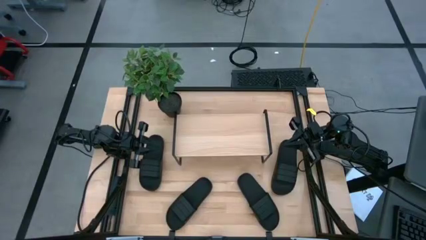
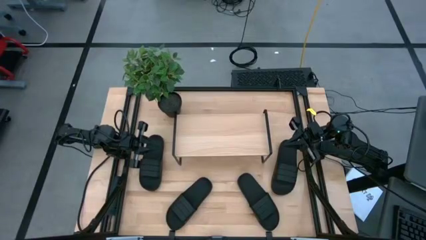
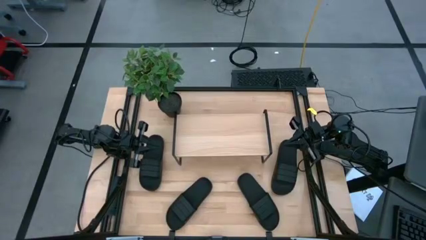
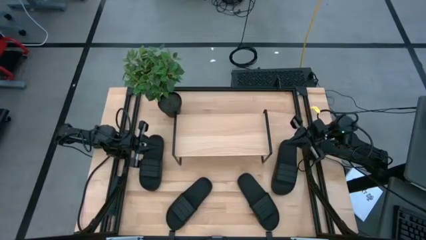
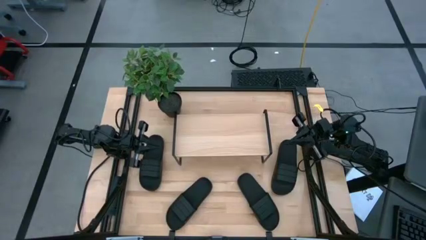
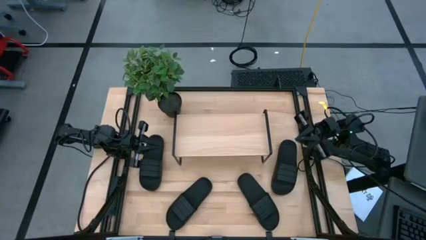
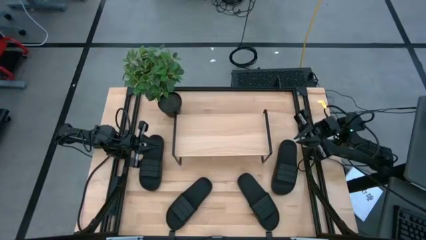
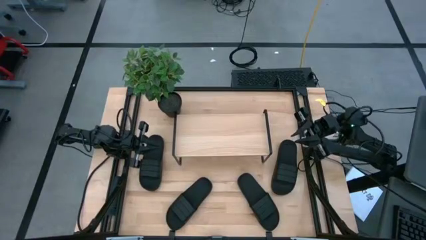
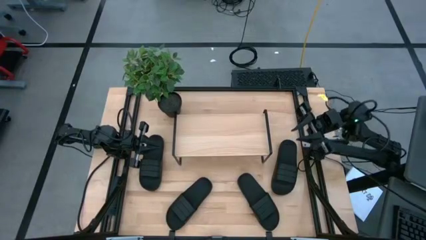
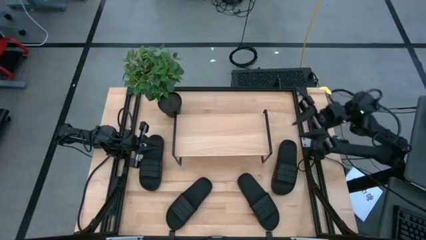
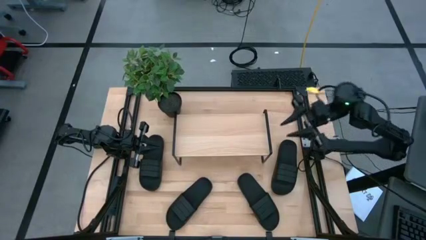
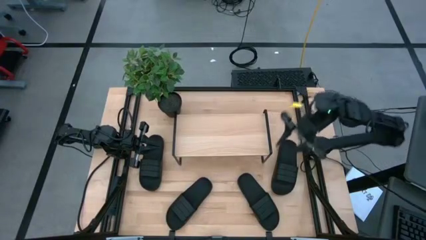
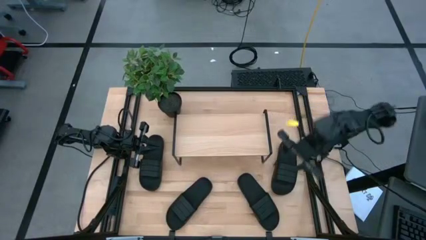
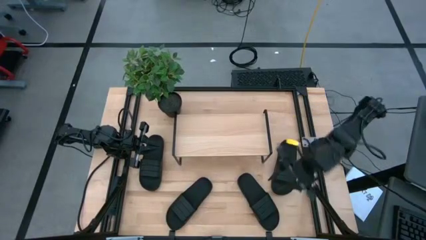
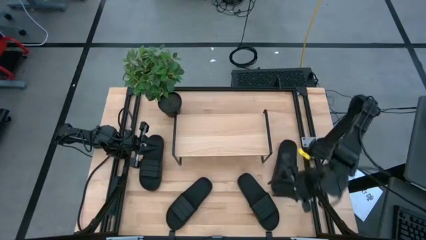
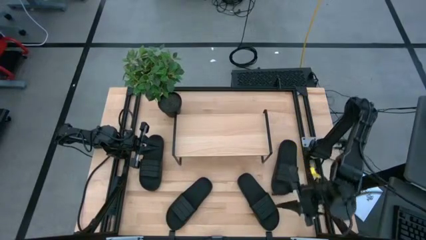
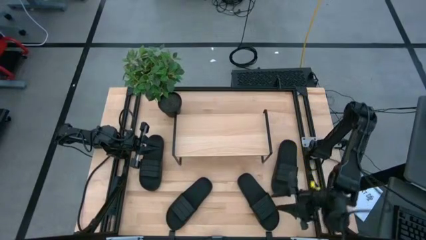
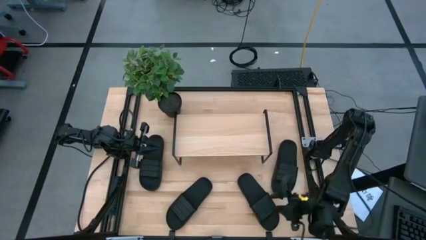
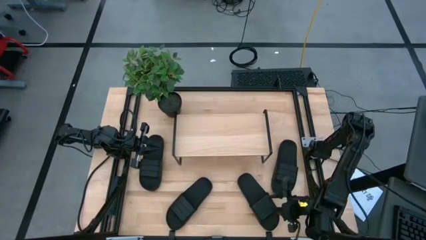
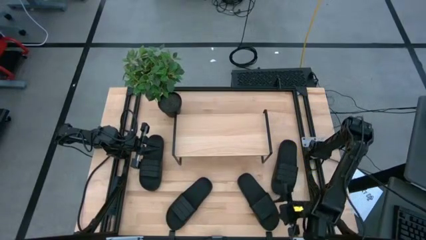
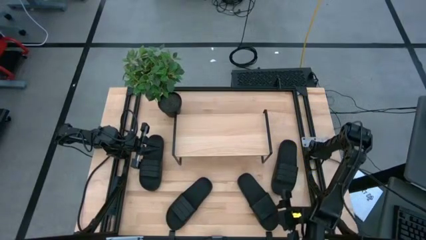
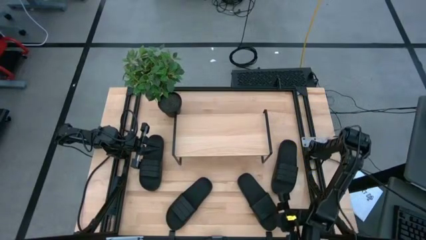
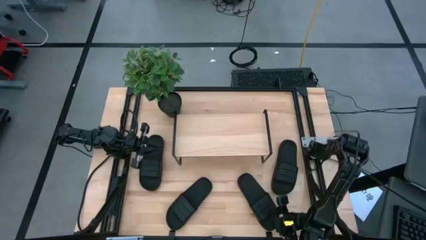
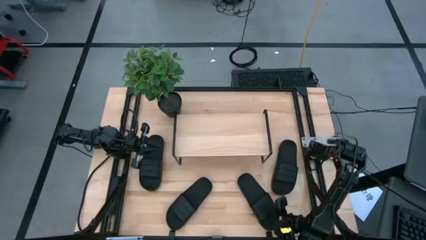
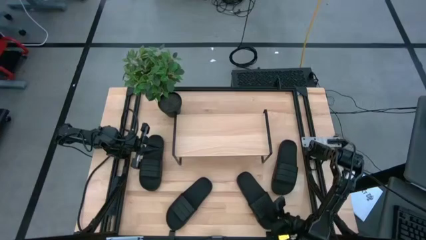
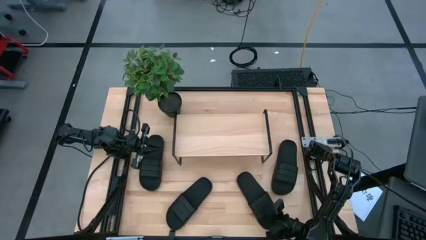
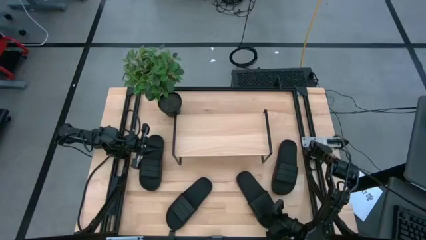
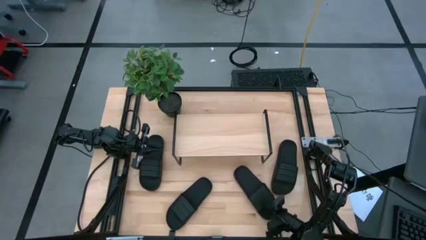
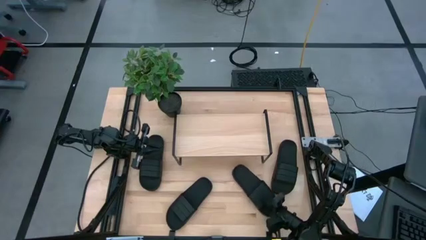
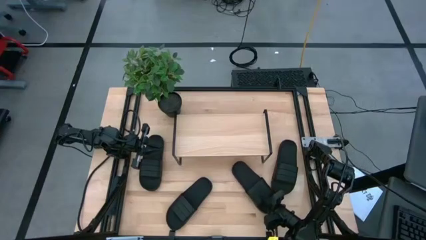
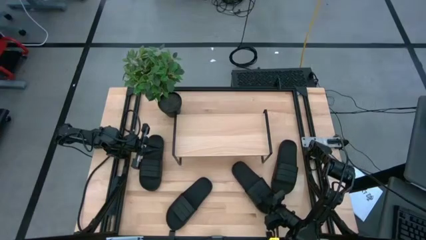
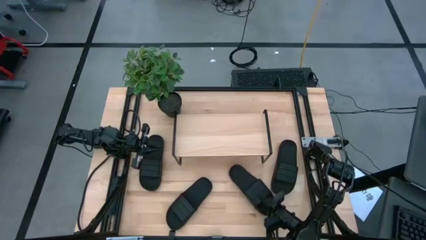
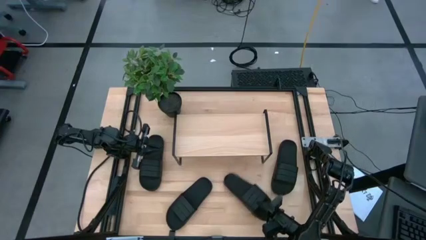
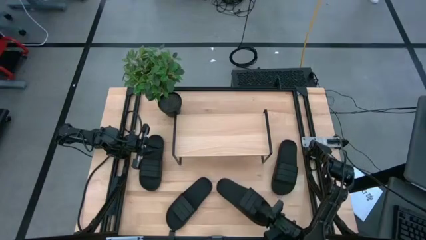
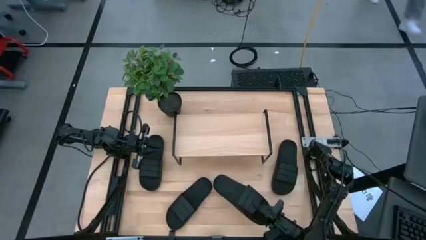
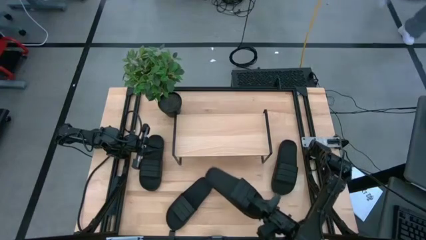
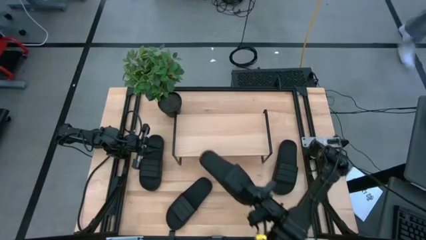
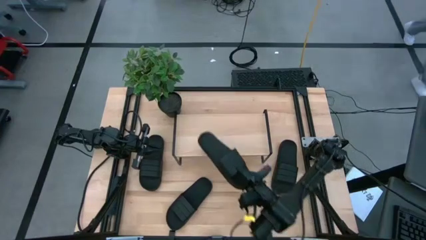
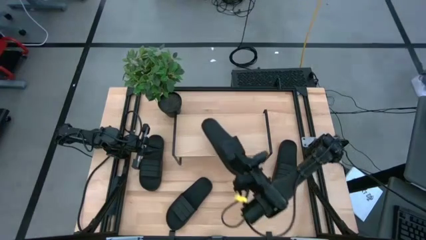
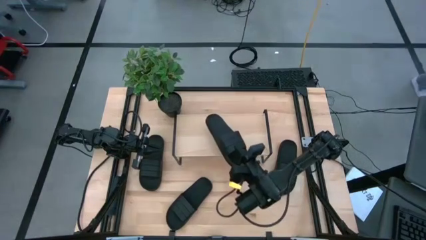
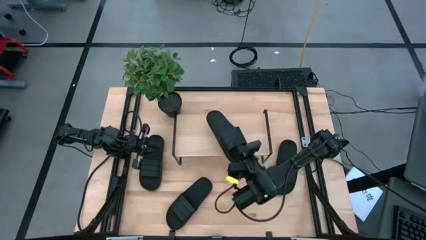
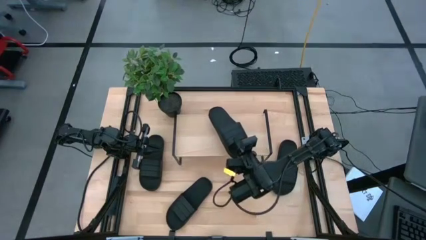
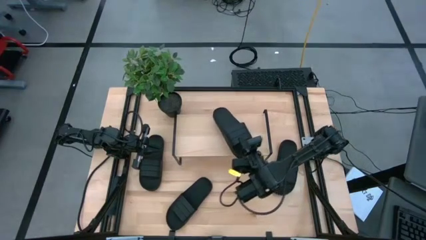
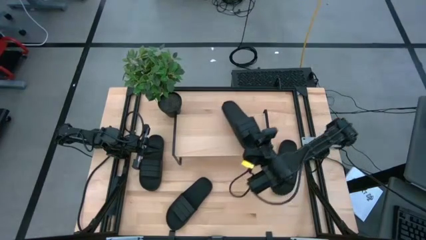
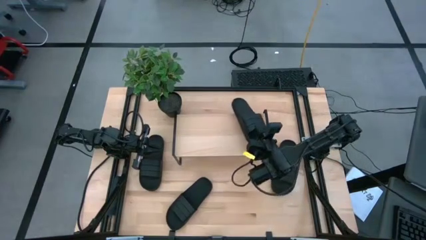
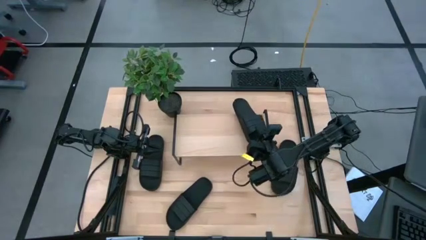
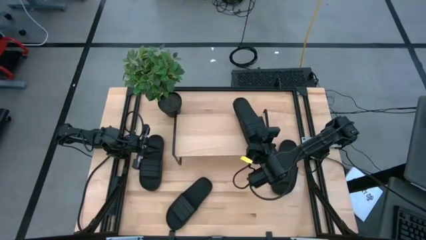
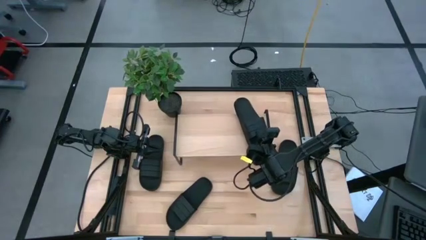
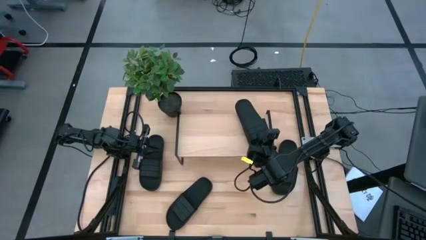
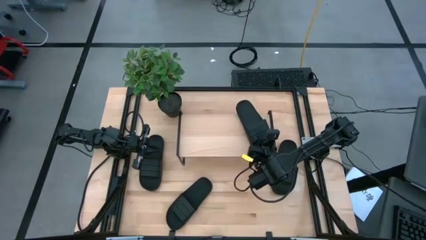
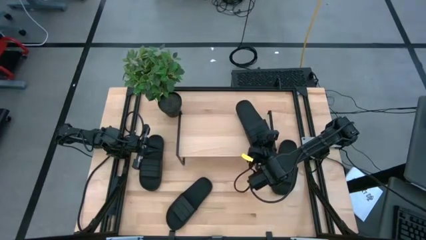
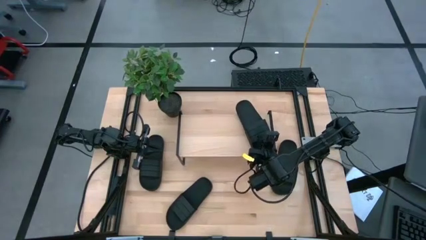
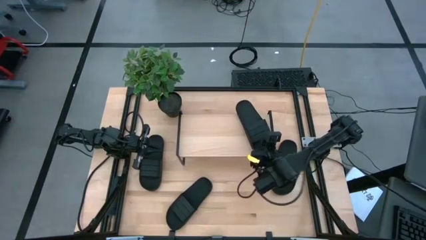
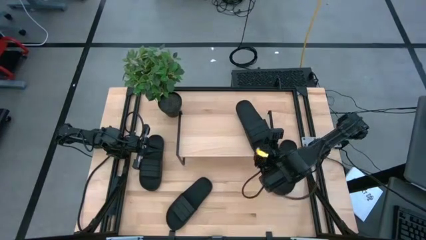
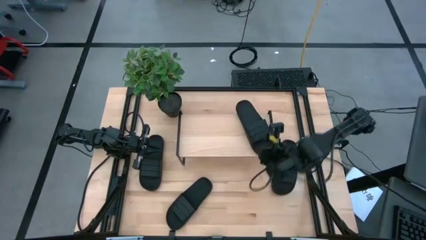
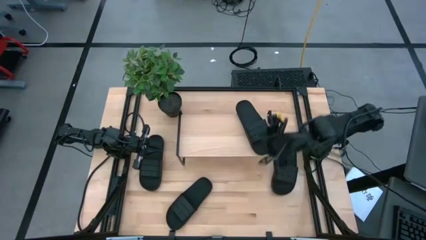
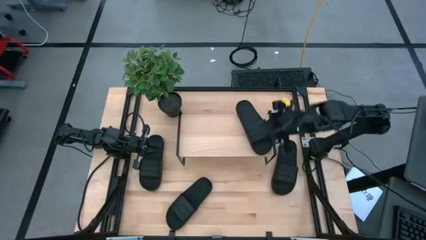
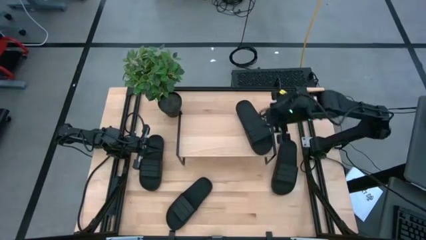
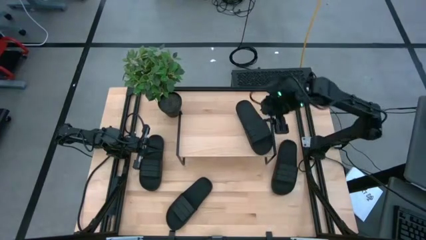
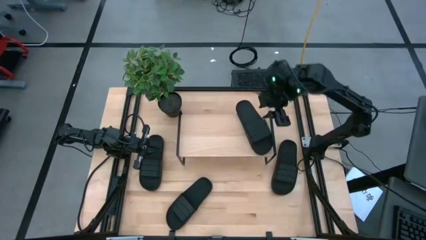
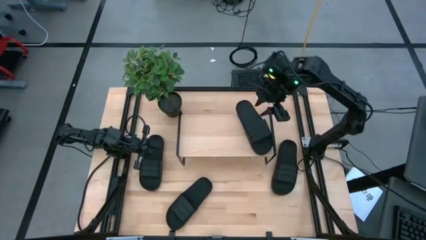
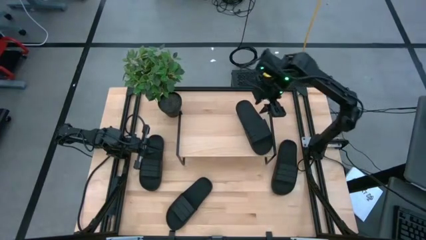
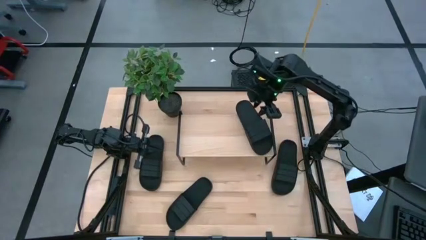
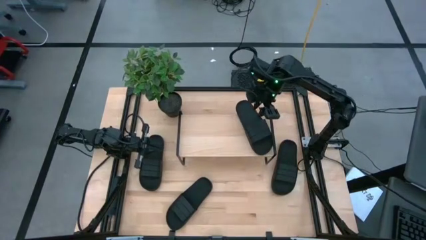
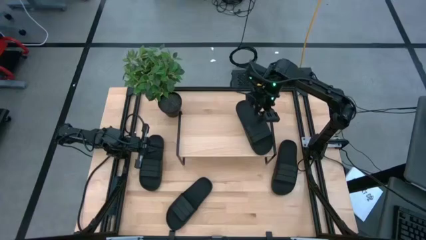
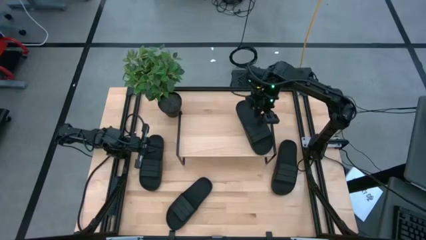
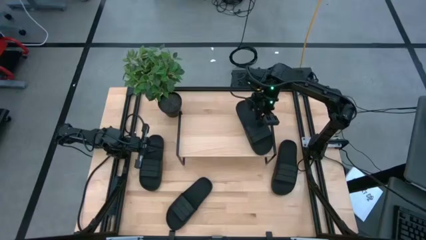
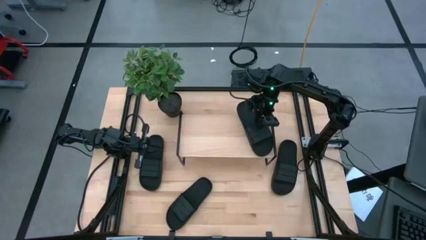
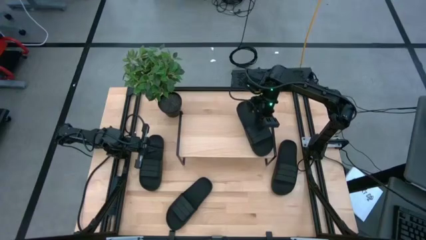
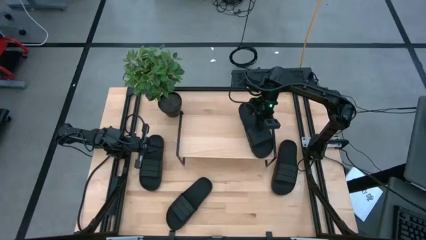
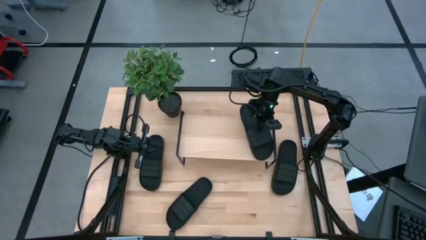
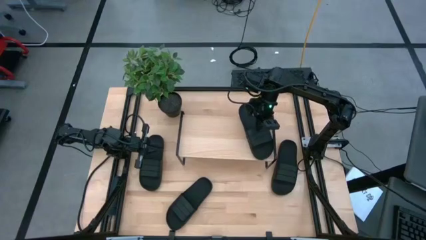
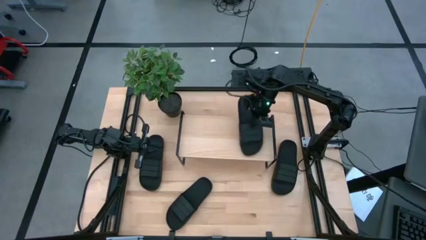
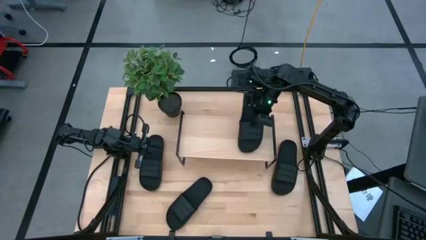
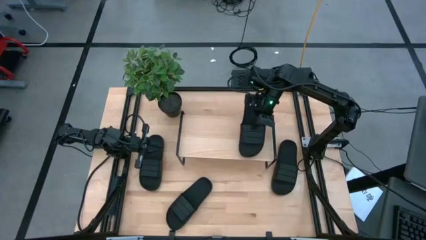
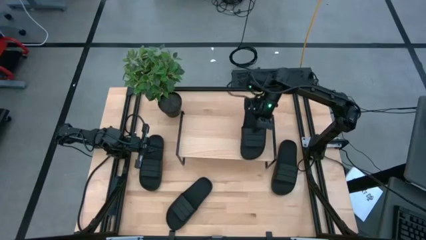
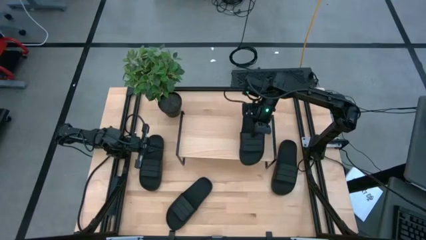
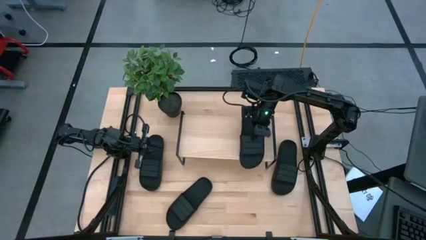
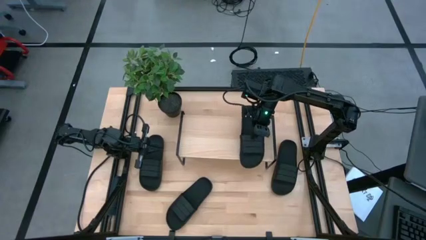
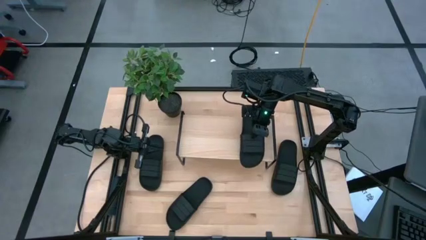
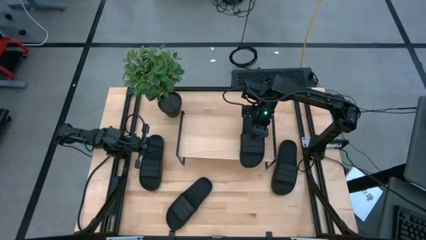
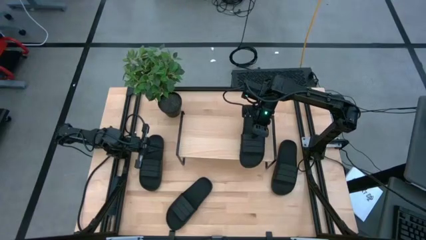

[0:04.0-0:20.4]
Task: Pick and place slides into the shelf
Put the black slide on the shelf
